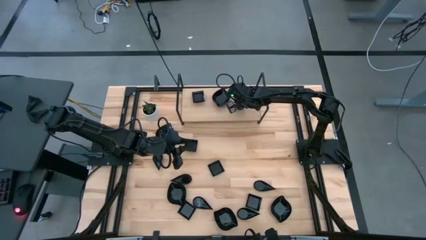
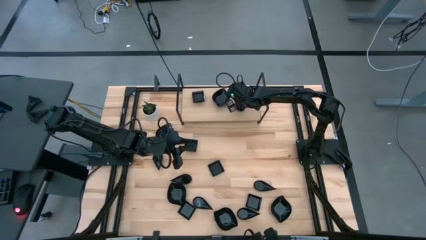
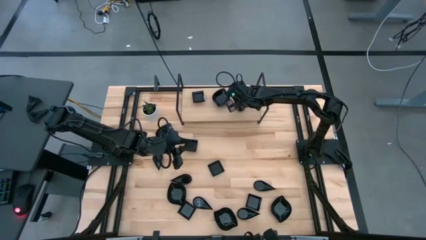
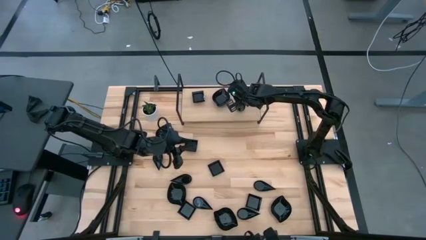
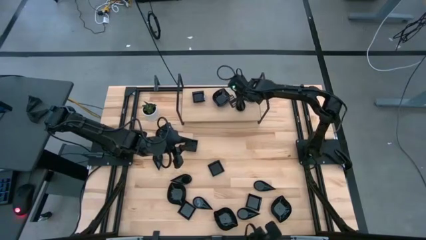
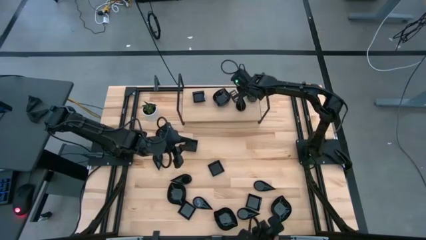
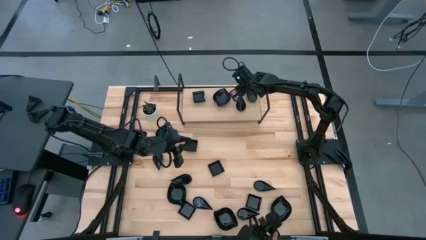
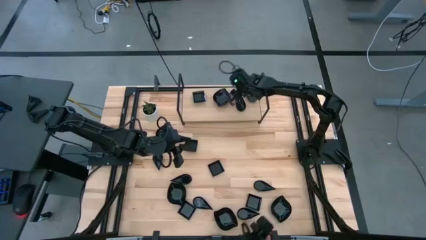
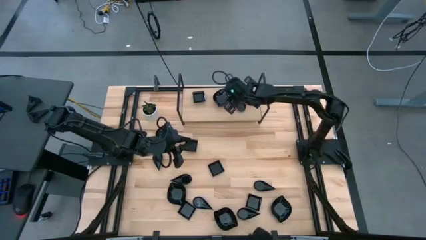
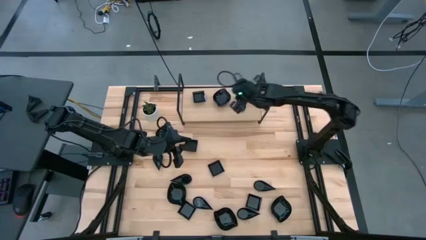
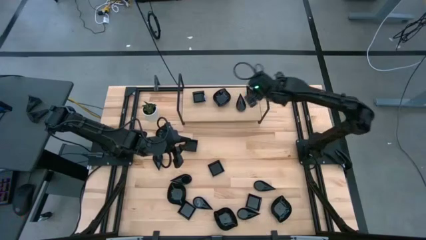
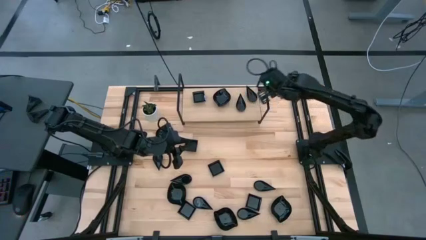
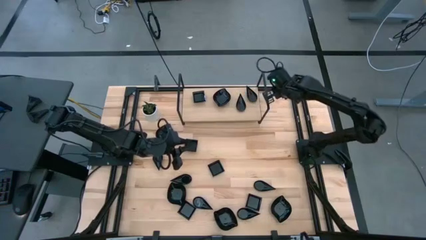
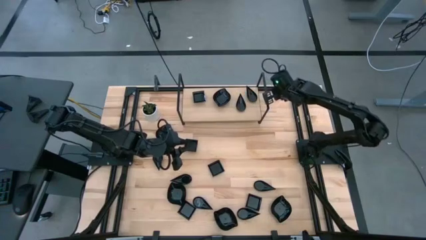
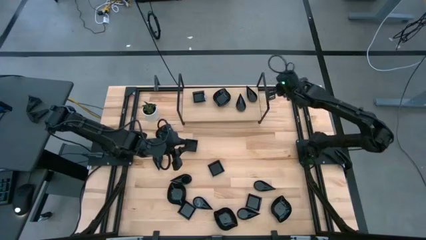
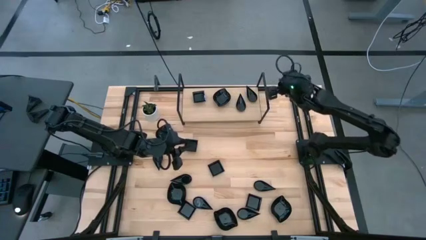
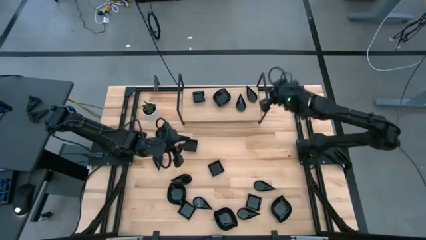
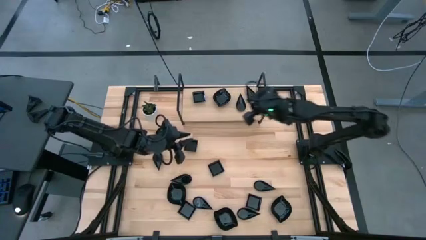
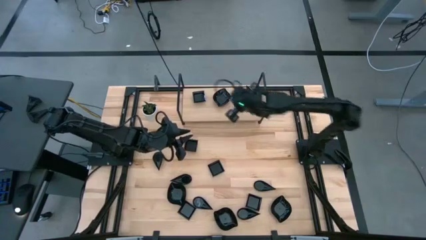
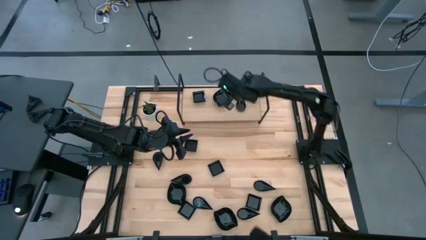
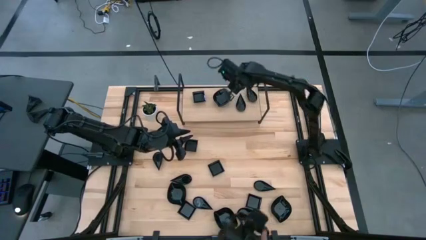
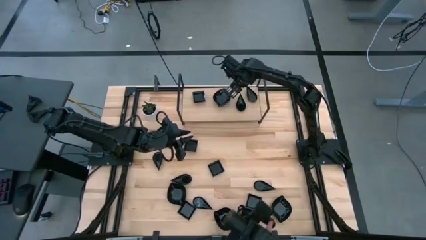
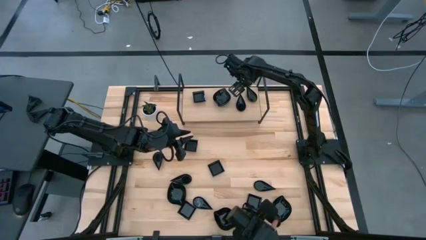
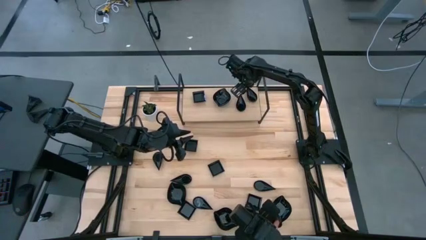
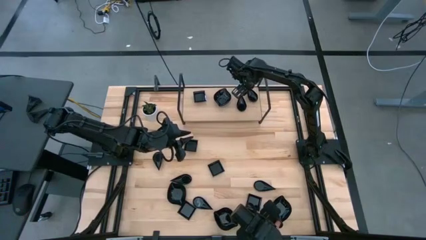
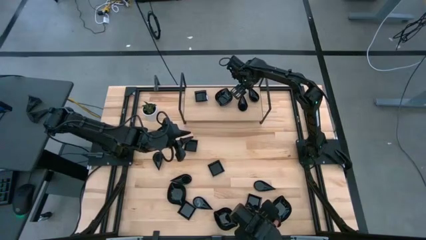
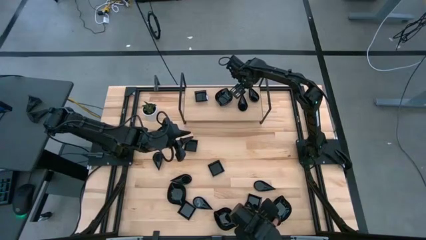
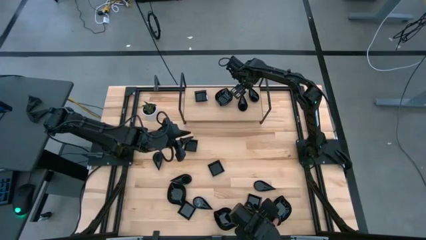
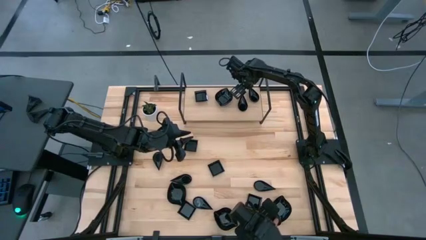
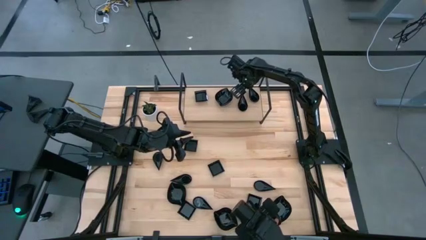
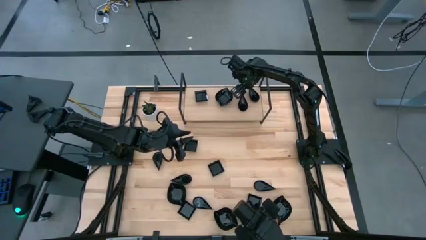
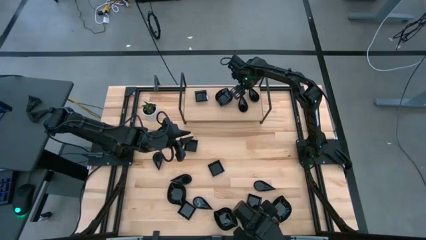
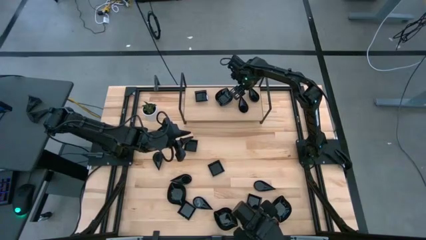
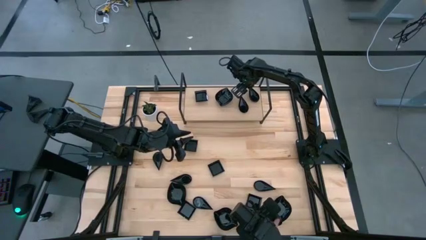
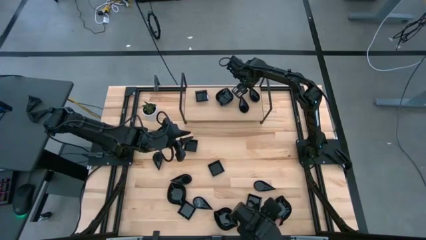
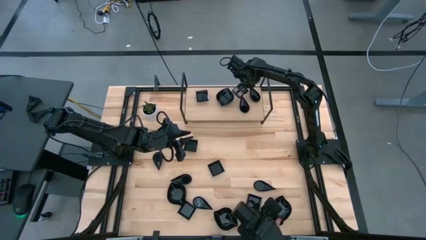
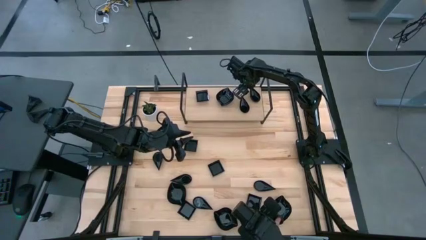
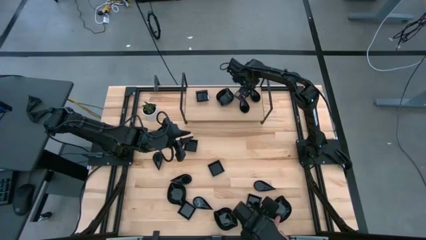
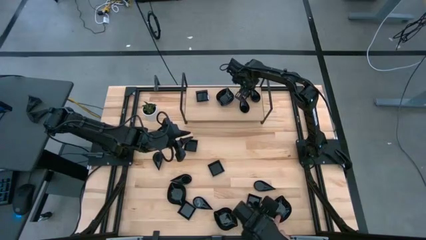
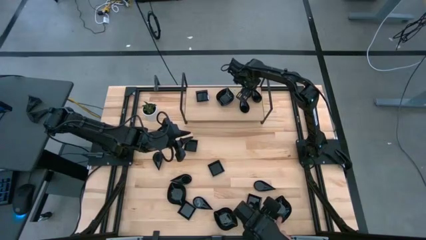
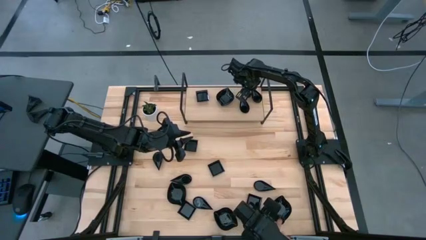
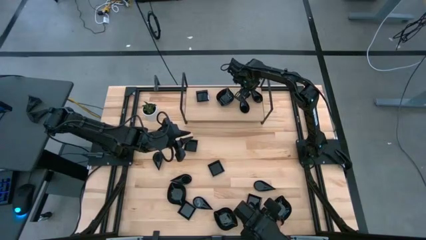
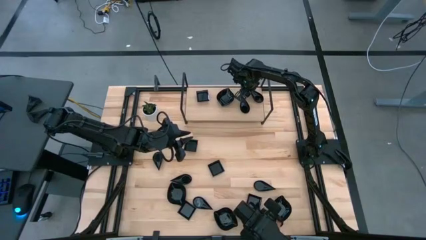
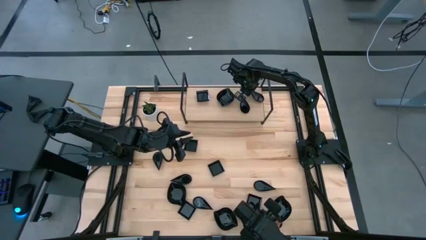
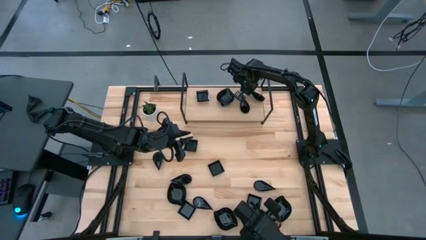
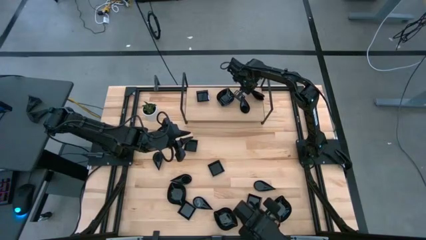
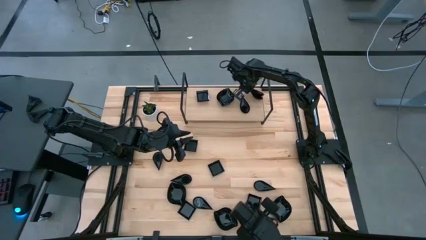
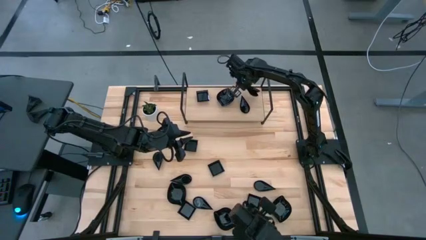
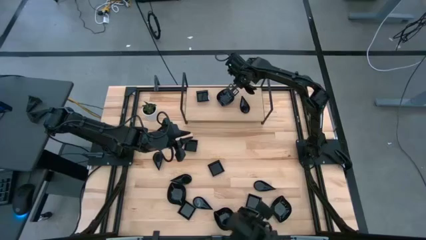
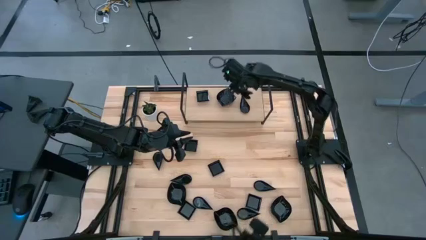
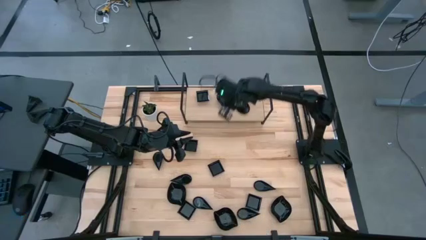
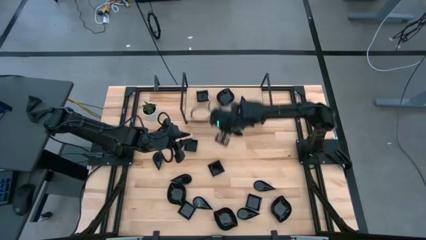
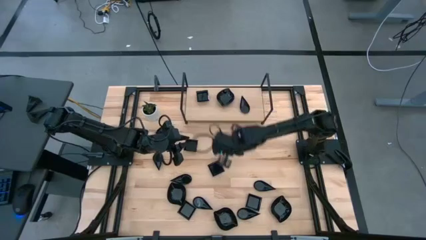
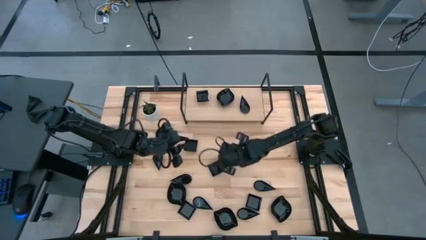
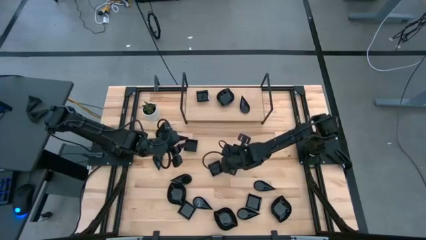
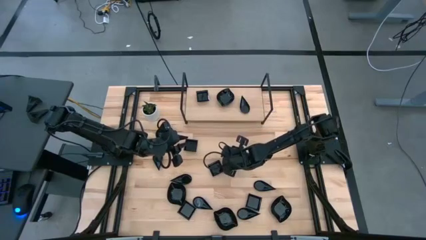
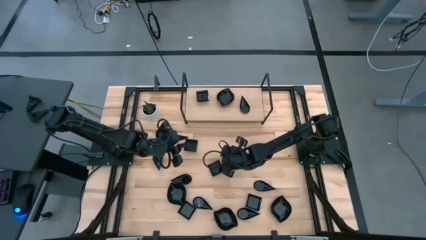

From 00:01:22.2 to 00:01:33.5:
Task: Pick & Place Mini shaped plates
Remove the stacked black teardrop shape bowls

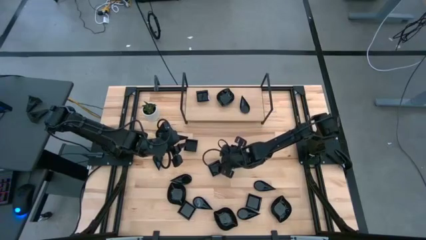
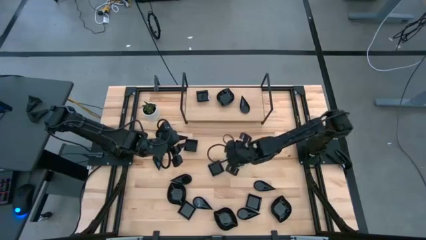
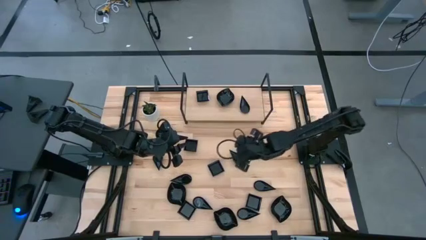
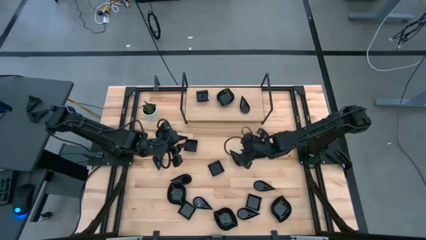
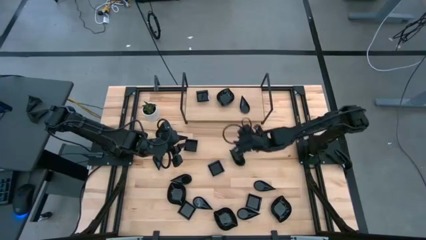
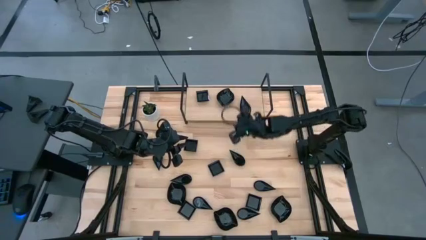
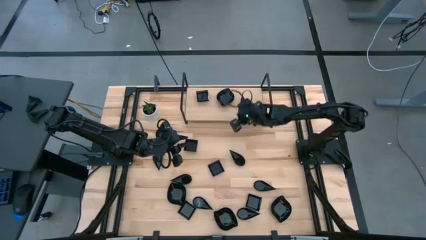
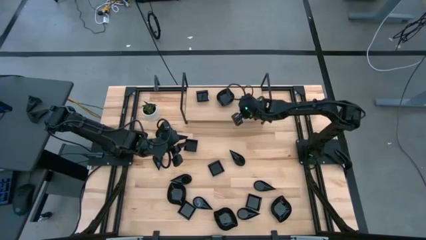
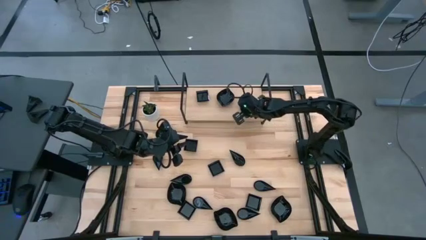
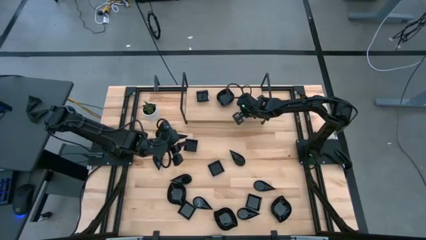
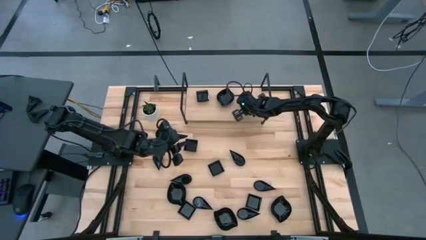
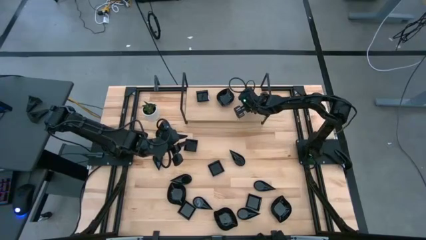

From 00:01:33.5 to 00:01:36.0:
Adjust the black teardrop shape bowl on the shelf

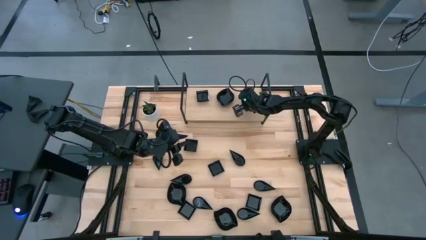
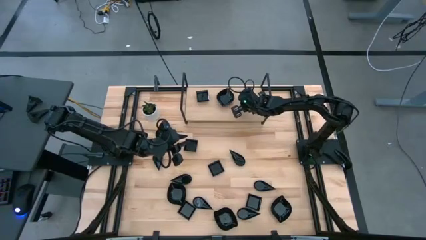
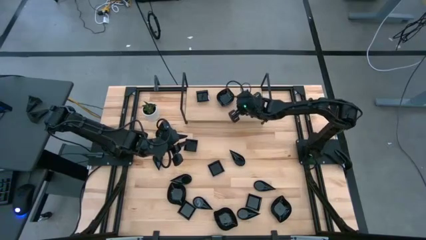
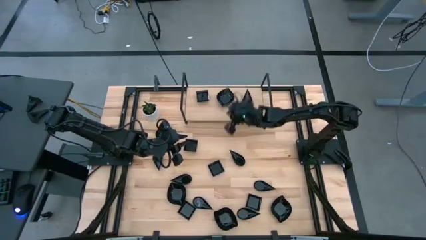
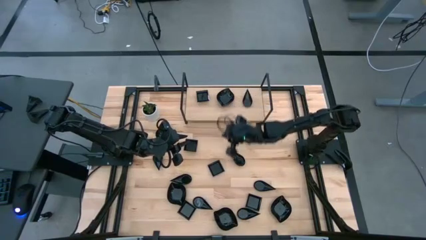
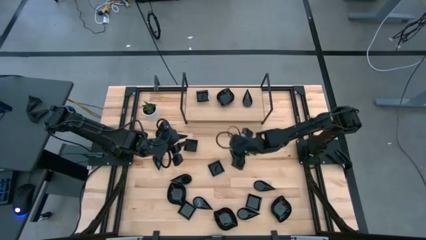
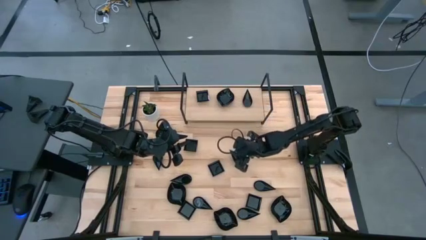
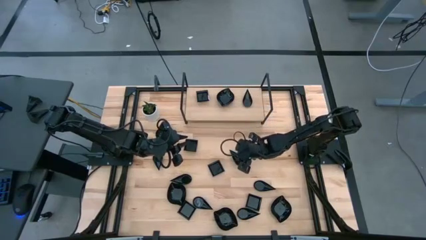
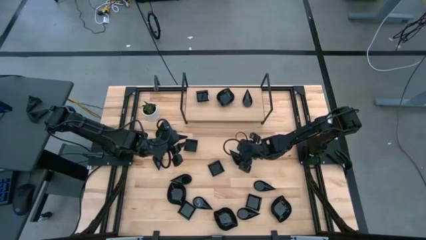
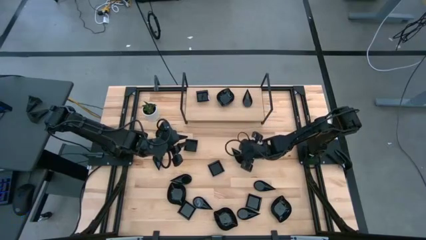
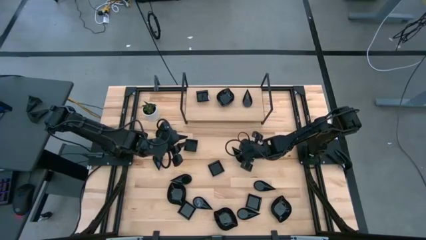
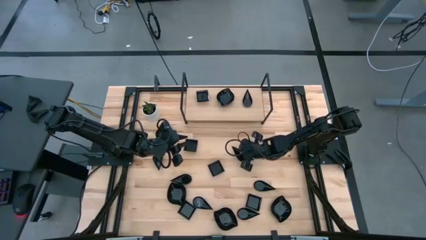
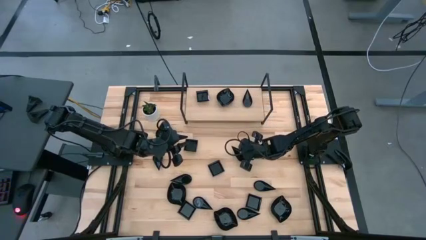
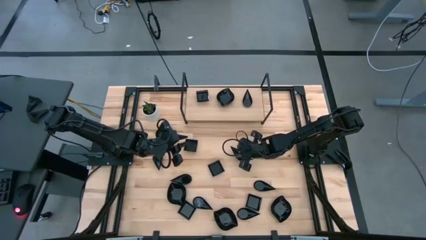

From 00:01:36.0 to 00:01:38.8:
Stack the top black teardrop shape bowl on top of the other black teardrop shape bowl on the shelf

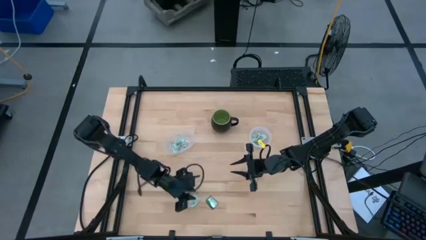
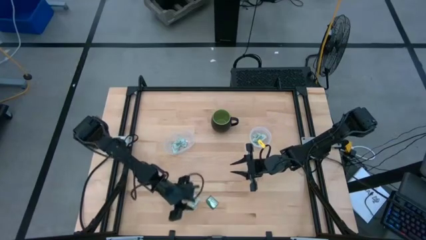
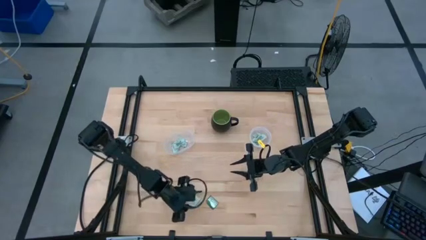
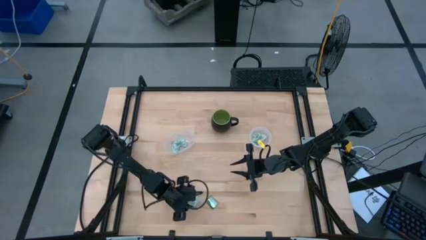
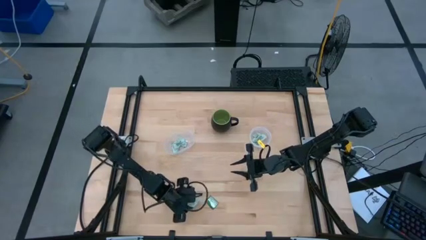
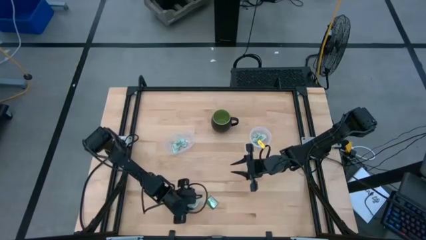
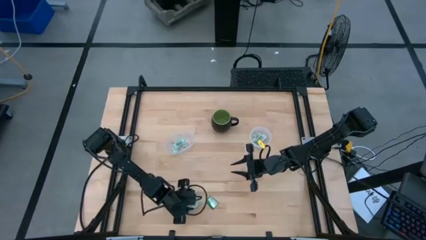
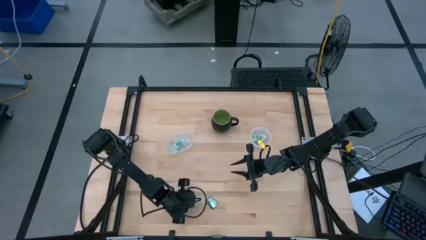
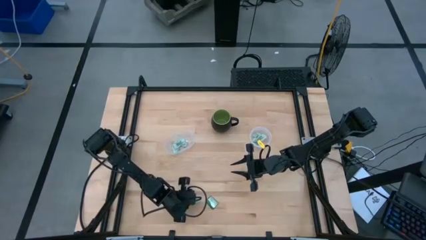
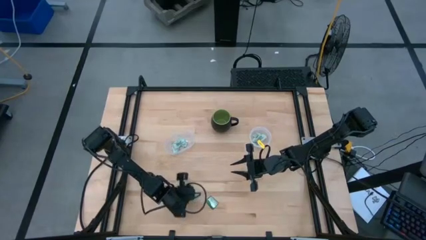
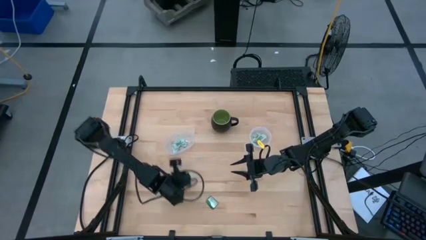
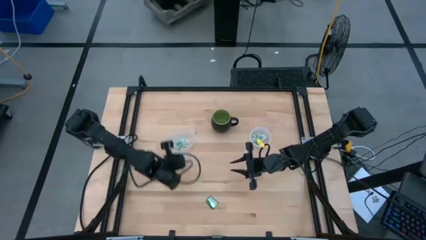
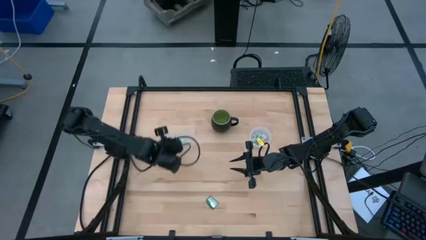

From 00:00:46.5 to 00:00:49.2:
Task: Pick and place Stevia / Truvia into bins
Put the green stevia packet into the left transparent container
